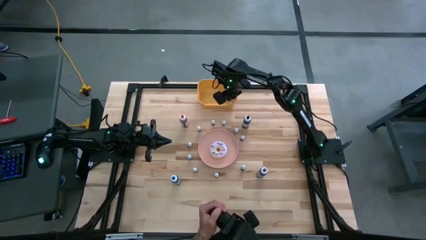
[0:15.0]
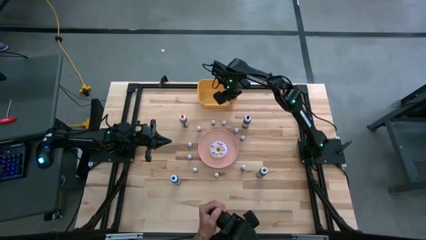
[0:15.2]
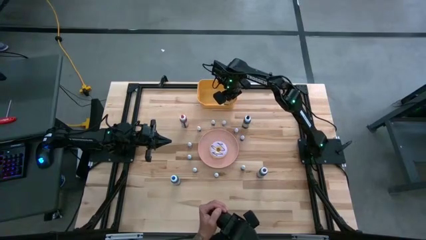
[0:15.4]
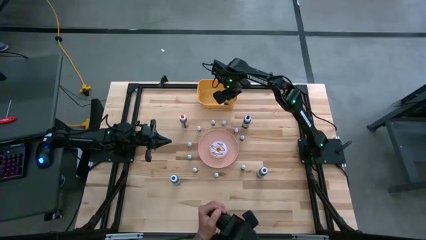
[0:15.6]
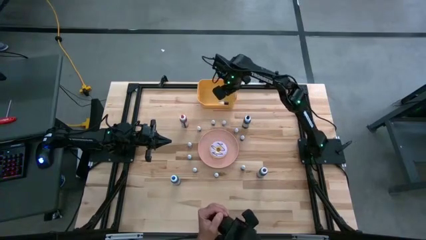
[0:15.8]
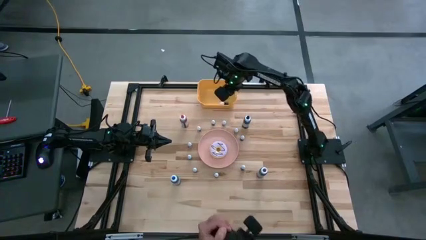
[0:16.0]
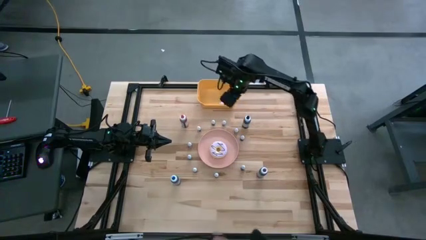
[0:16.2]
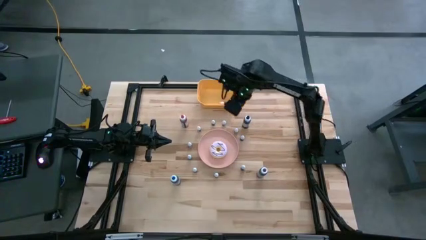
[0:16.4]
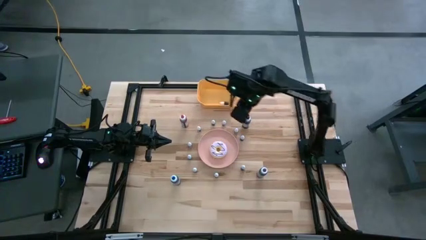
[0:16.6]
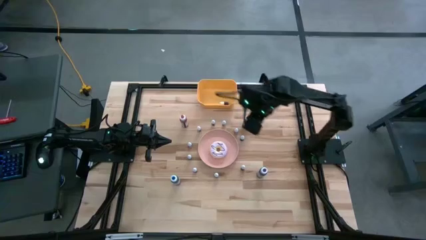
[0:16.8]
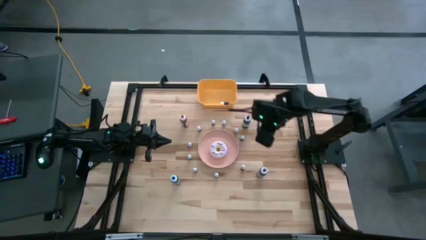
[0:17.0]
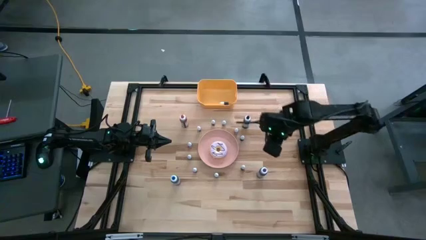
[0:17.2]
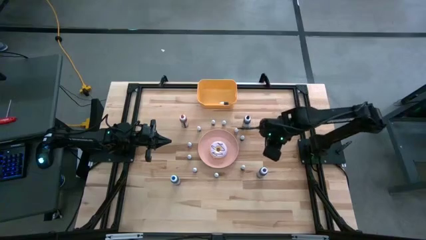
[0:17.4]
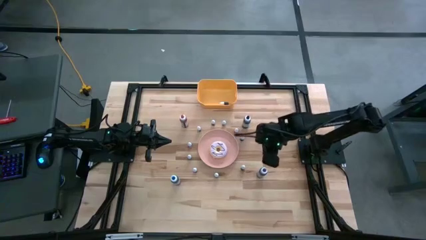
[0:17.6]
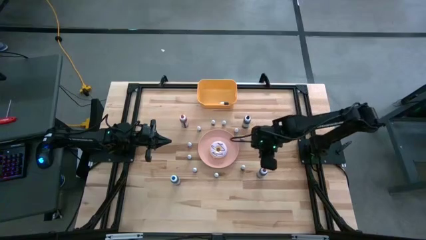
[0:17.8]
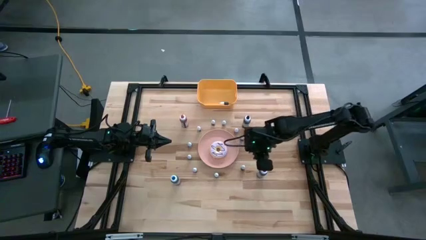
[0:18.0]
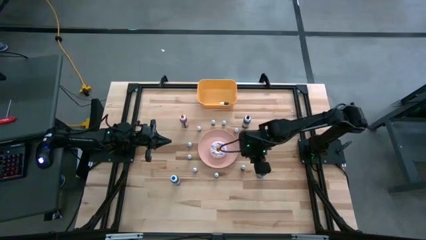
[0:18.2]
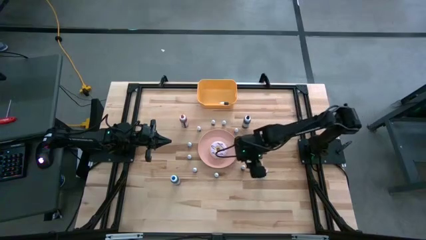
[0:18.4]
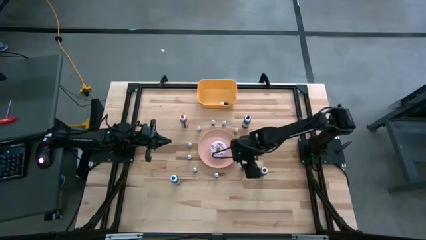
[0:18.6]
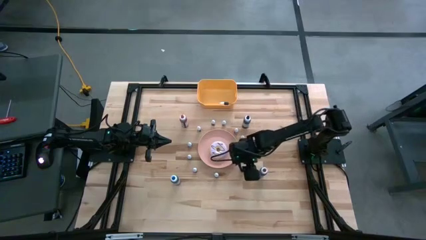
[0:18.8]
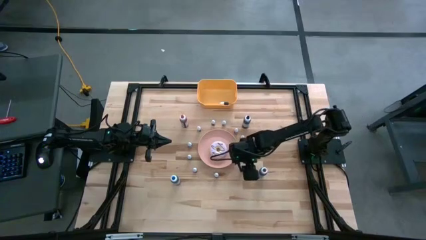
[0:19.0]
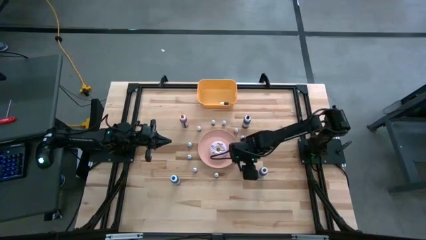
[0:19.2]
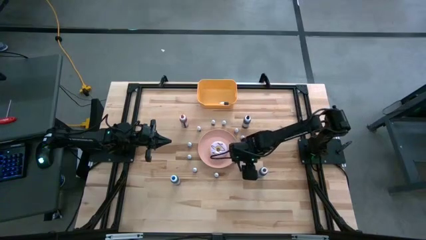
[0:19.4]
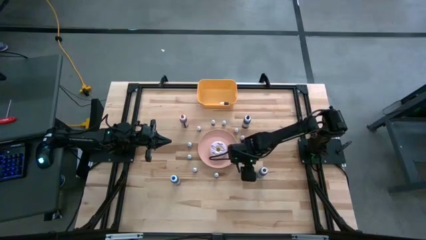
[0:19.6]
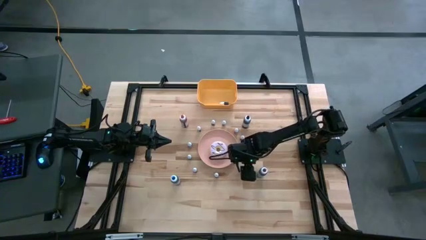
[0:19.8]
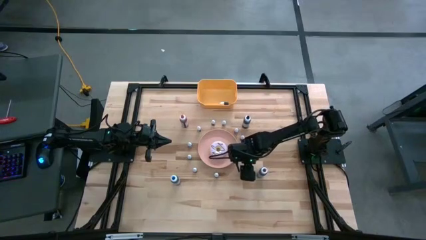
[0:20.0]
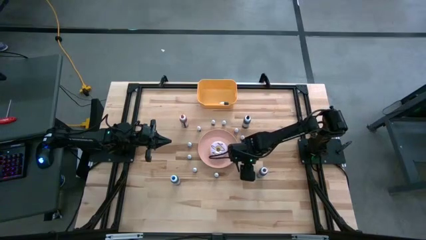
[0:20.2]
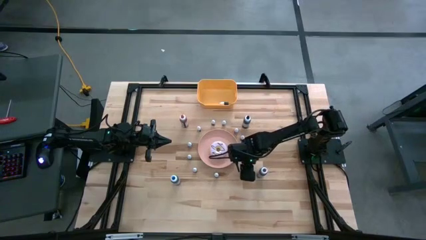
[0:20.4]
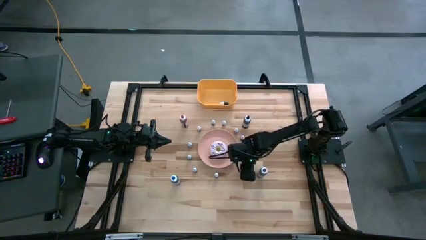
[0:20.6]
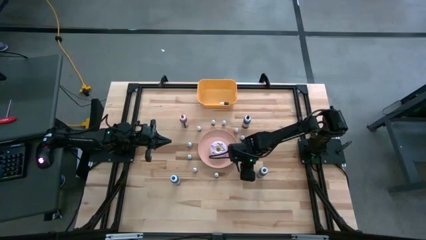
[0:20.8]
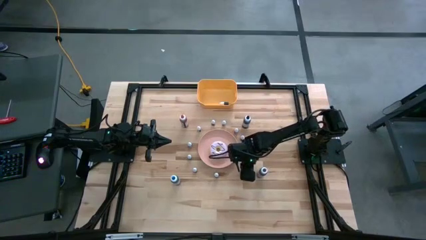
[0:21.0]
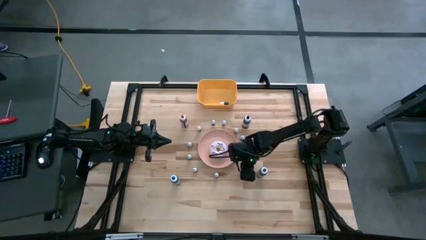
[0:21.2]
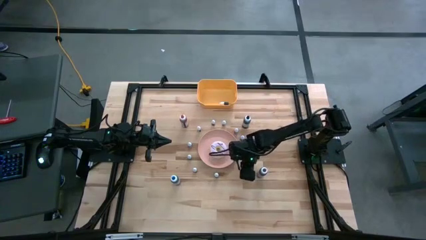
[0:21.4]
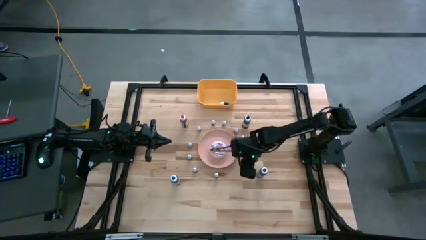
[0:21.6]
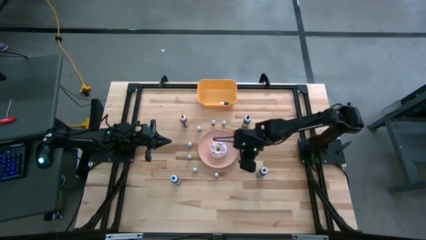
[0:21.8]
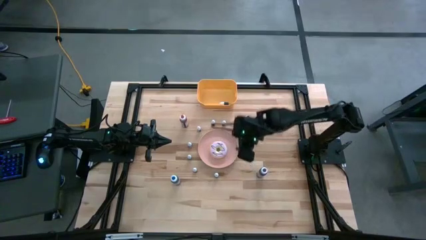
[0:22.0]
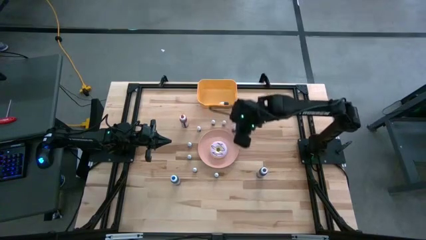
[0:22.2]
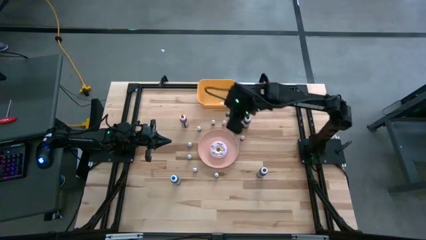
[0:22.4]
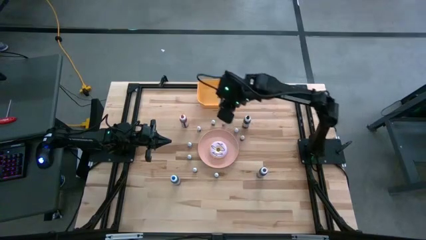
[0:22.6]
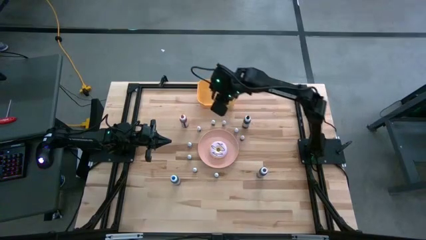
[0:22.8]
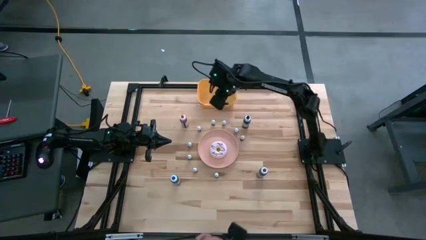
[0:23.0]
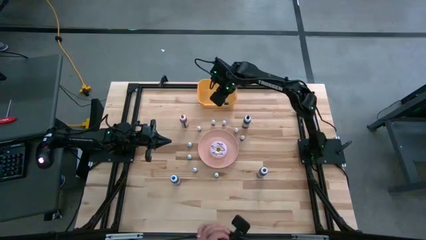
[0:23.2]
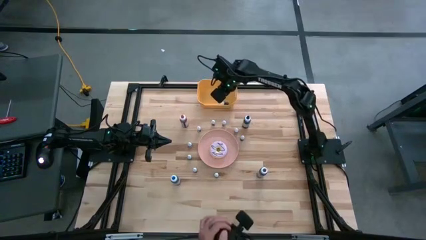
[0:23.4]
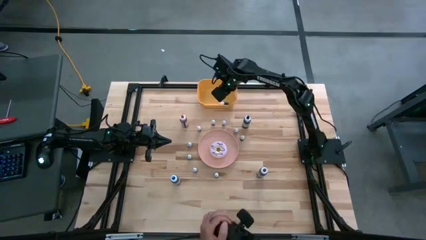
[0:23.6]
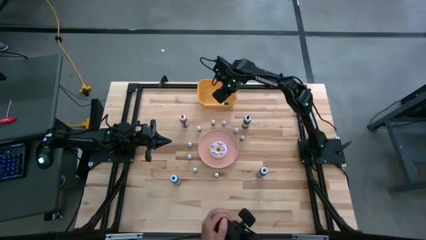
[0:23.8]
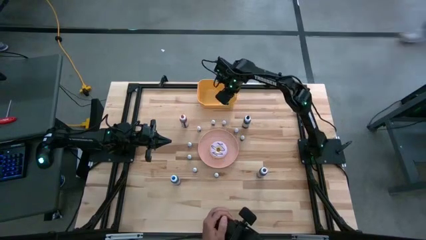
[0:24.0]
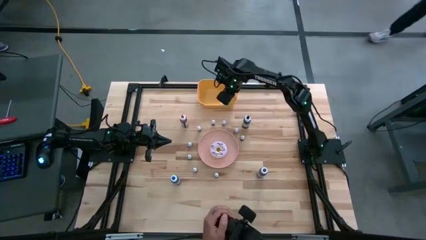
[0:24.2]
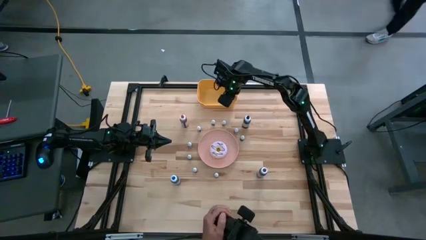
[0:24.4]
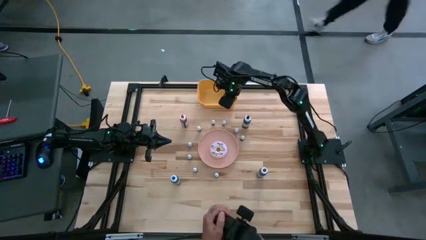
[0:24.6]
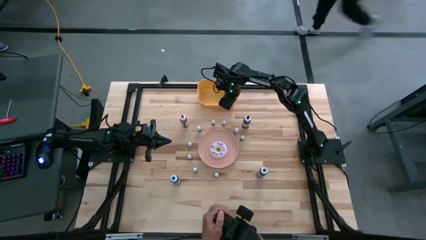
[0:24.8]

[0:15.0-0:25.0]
Task: Pick & Place food coloring
Put the small black food coloring bottle into the orange bin

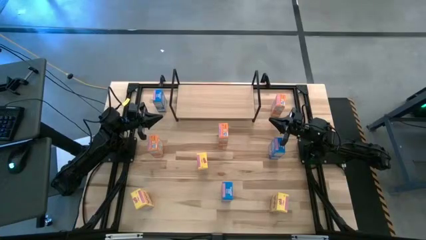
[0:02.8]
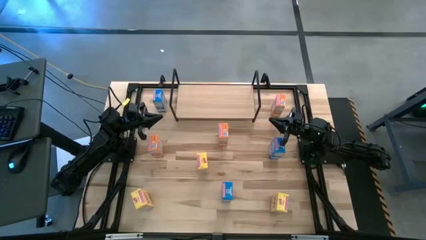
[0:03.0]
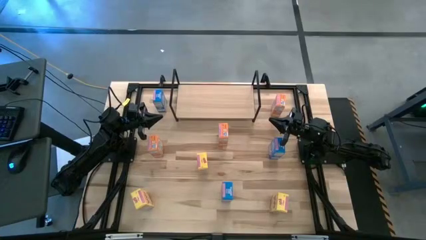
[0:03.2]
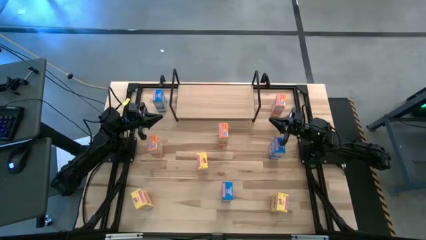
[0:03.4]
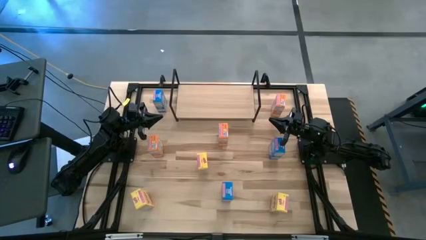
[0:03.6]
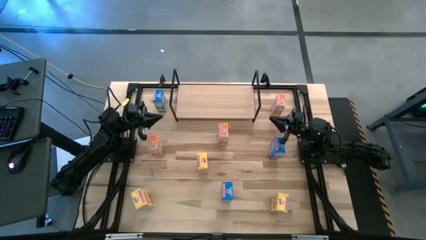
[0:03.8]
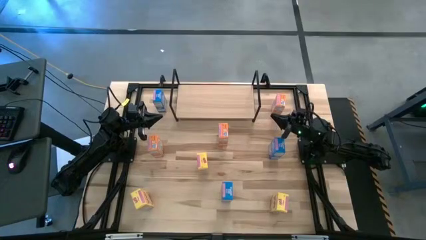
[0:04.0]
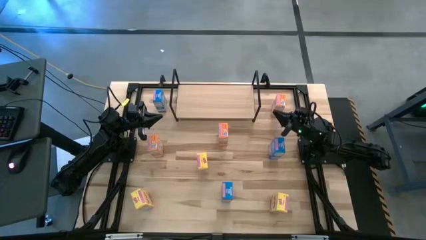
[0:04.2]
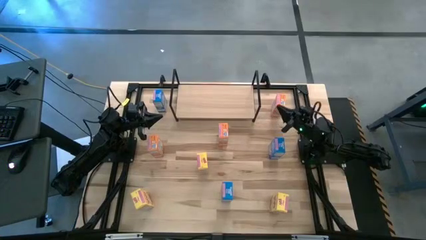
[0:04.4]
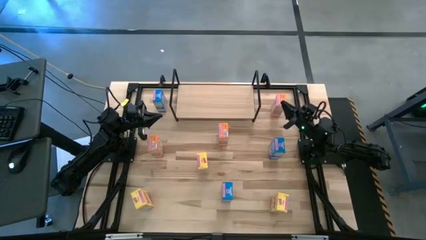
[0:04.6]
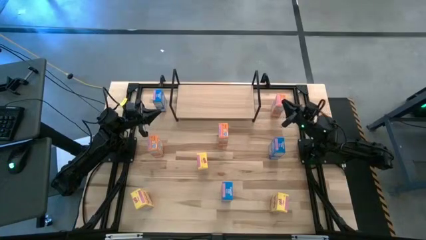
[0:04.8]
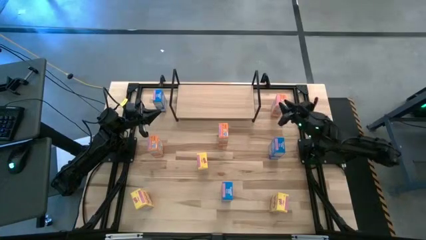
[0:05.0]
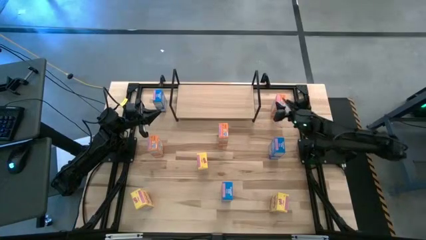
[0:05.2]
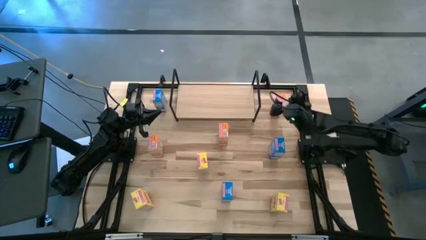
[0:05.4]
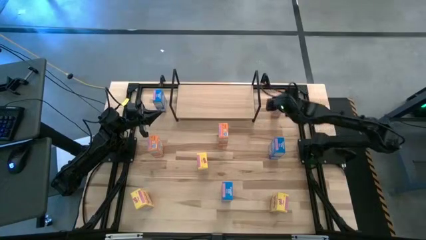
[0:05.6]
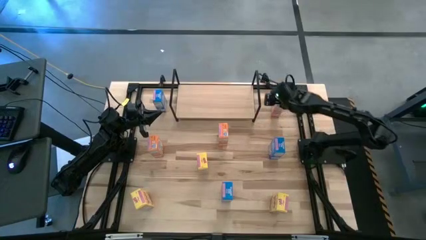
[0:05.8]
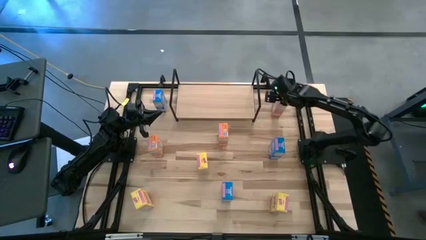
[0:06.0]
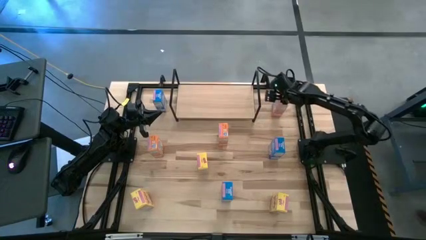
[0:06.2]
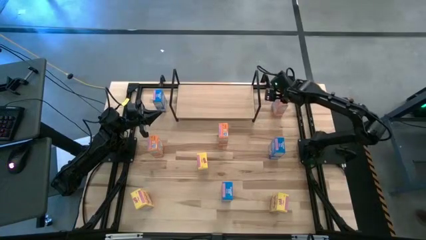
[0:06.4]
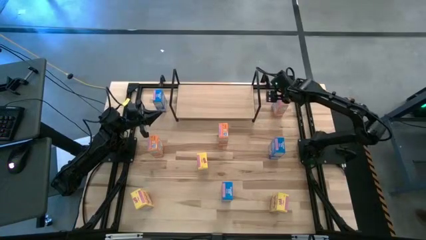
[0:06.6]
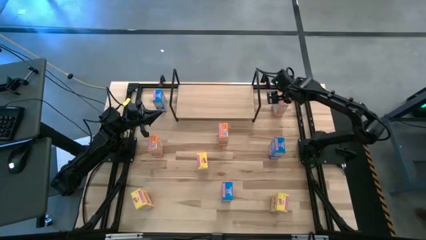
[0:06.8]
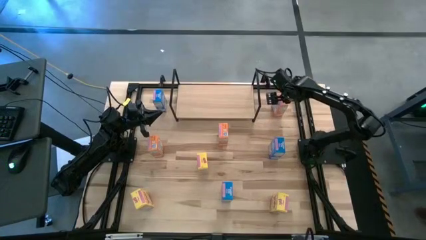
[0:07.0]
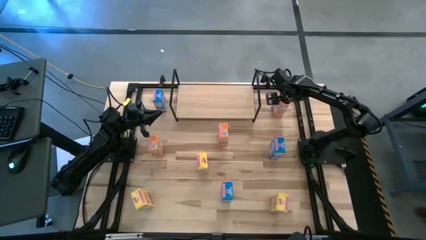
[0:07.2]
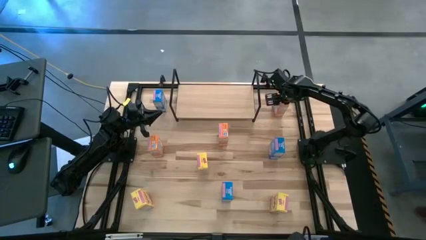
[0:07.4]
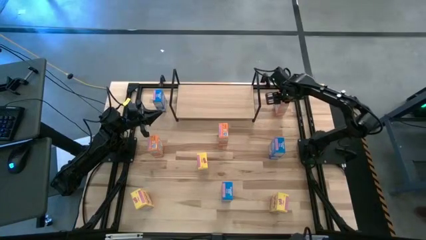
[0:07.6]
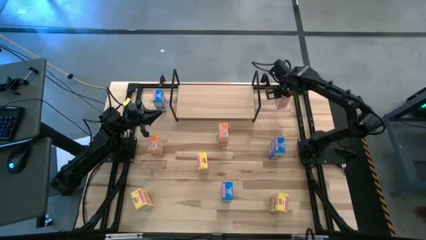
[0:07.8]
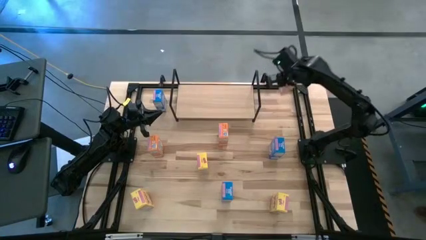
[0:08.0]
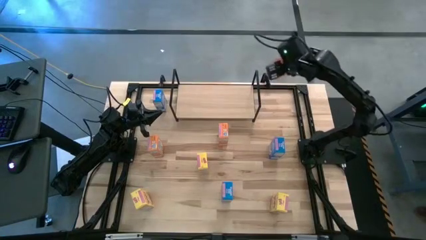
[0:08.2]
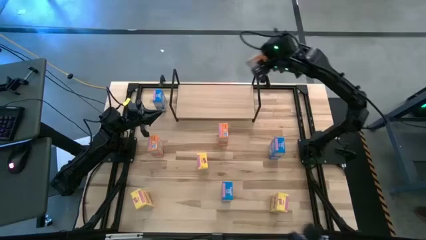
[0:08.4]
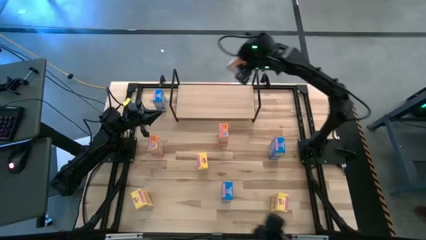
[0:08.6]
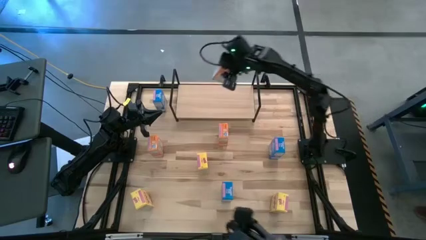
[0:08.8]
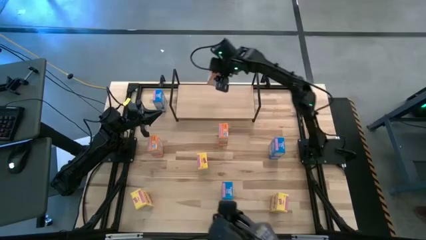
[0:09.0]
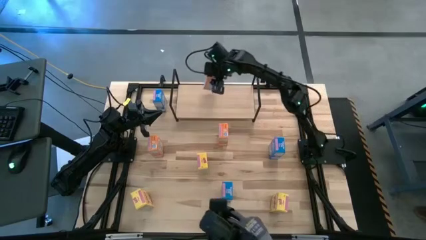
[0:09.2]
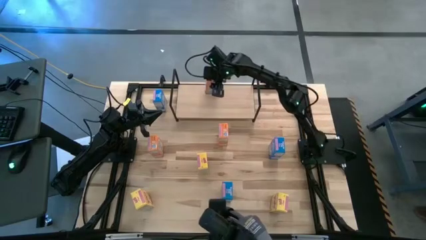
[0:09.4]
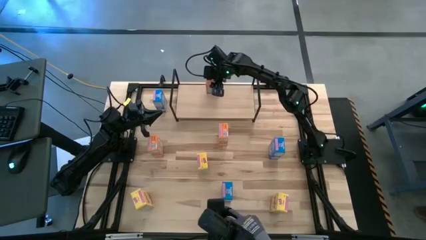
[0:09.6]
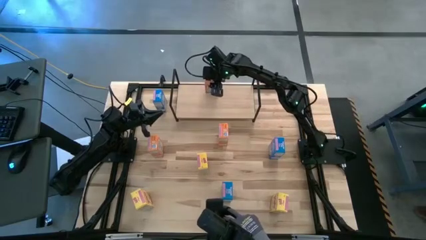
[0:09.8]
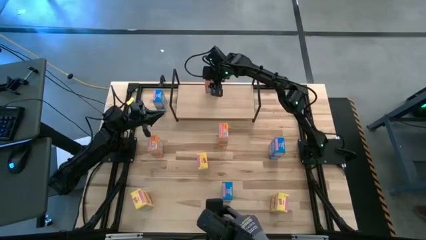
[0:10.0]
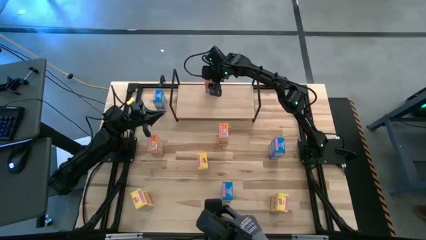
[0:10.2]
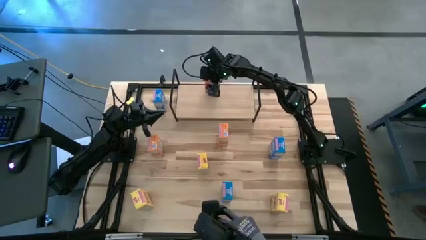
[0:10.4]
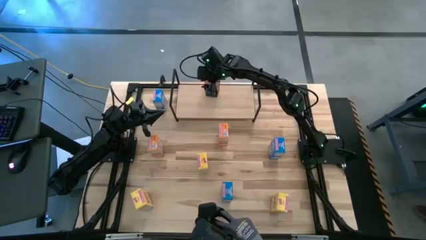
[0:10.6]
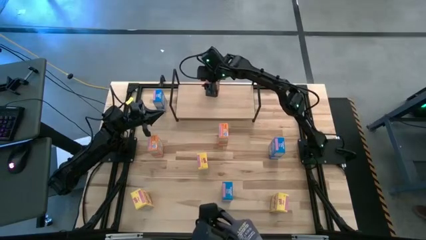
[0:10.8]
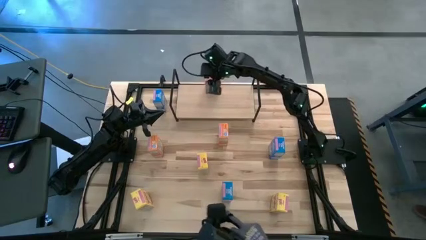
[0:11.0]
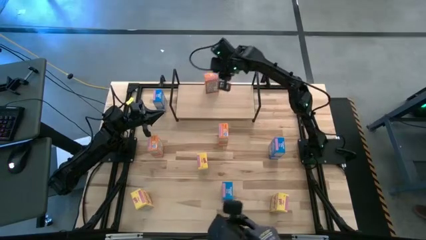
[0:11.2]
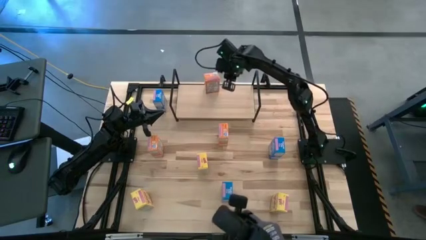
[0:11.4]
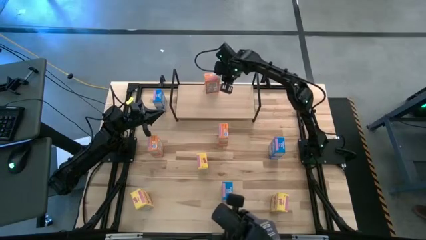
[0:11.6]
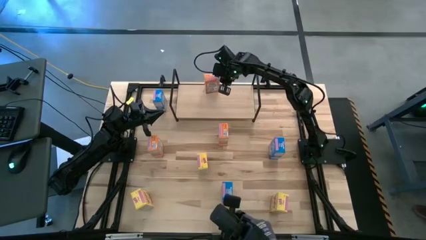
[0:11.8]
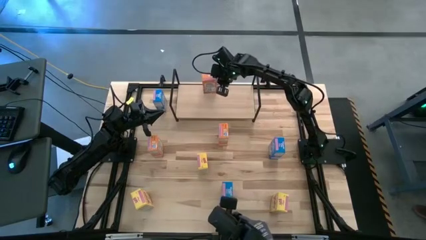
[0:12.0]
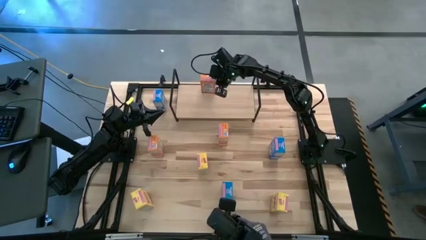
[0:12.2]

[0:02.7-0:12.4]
Task: Stack cereal on shelf
Put the top right orange cereal box on the shelf
